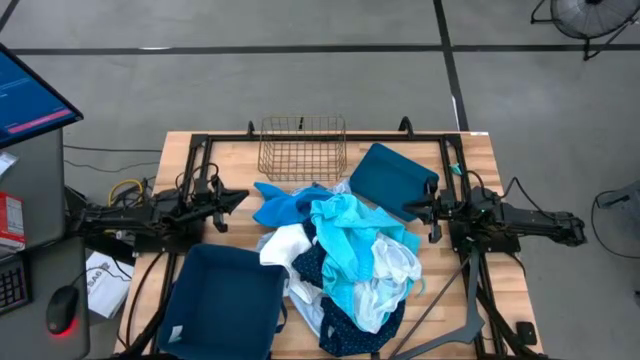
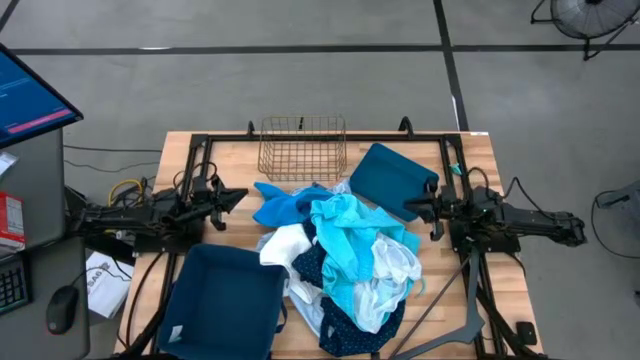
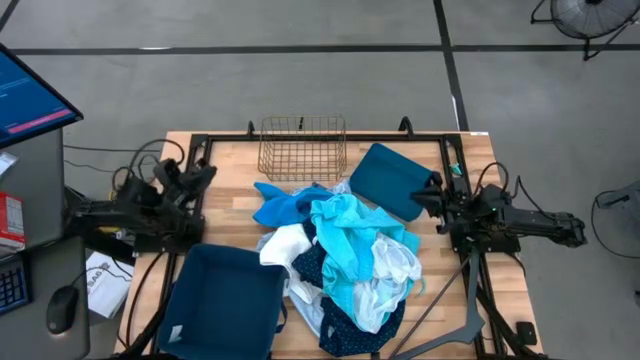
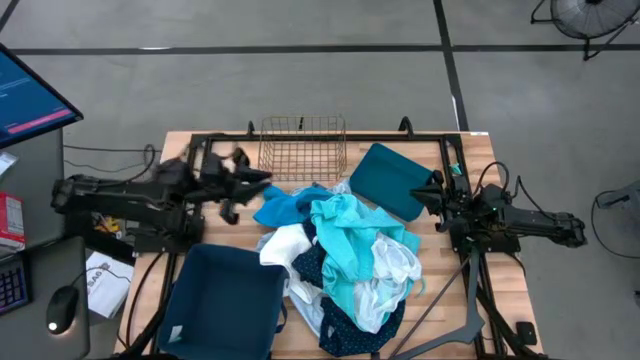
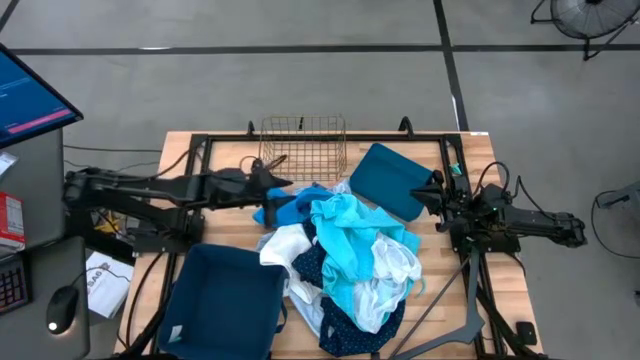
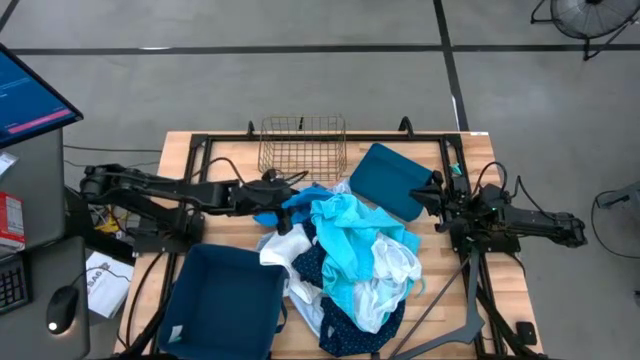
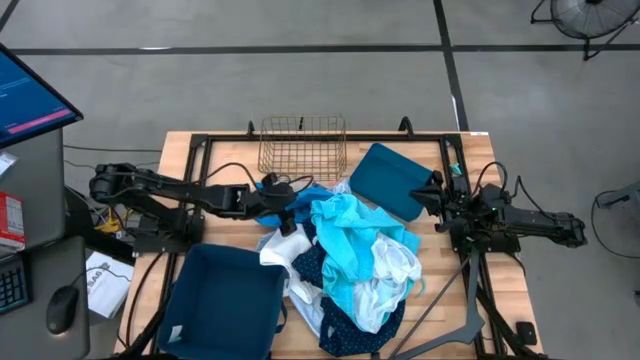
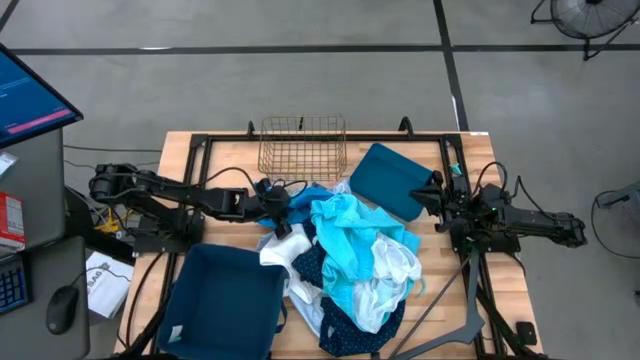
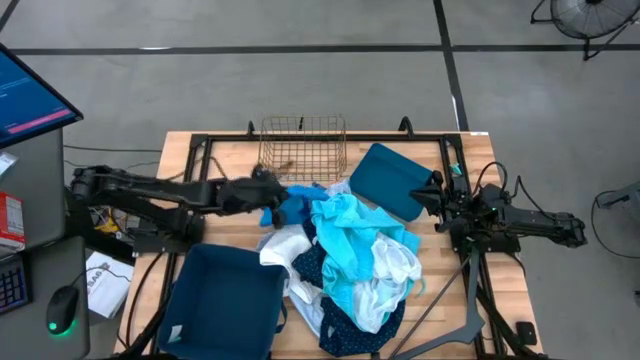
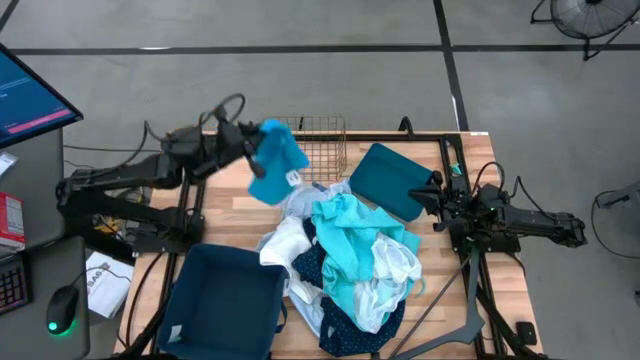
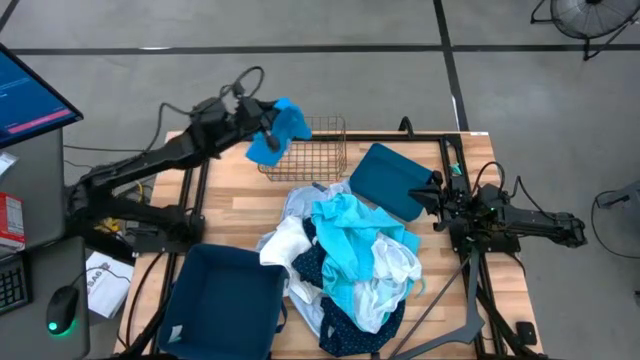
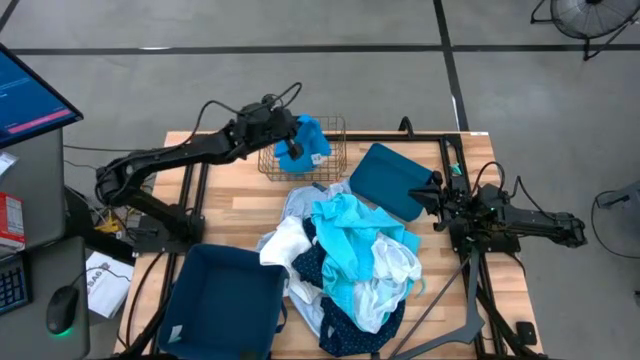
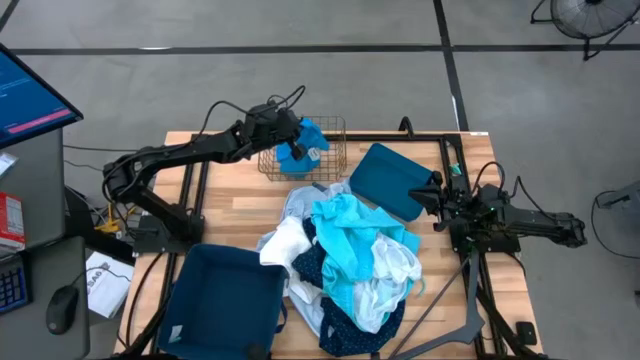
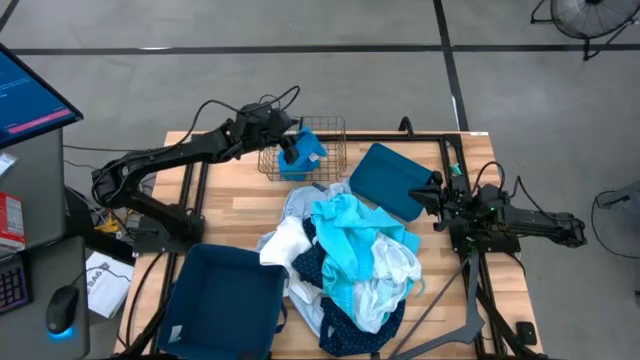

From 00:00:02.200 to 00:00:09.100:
Task: Pick & Place Cloths
Put the blue shorts into the gold basket

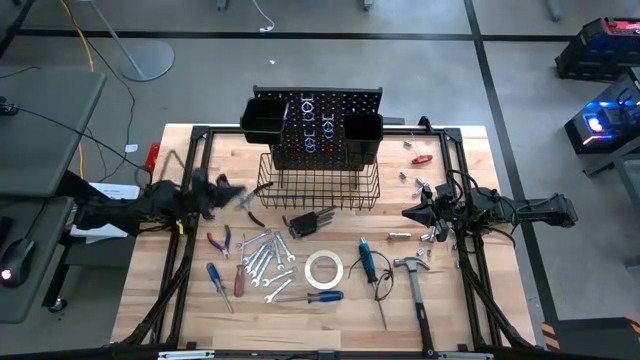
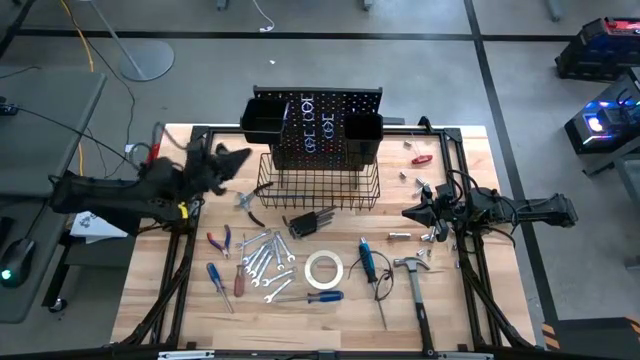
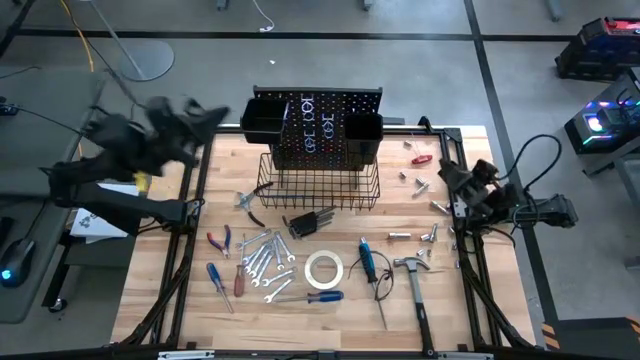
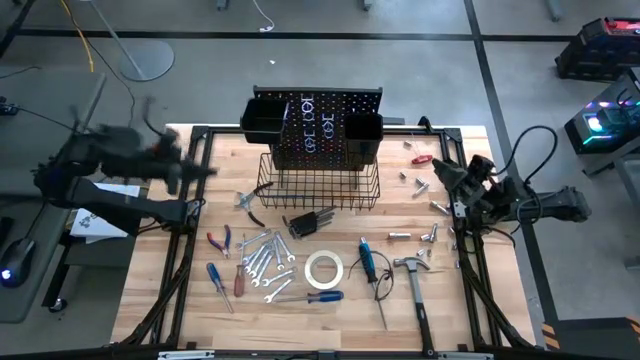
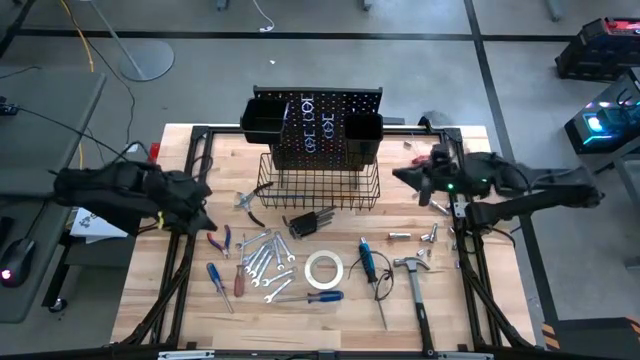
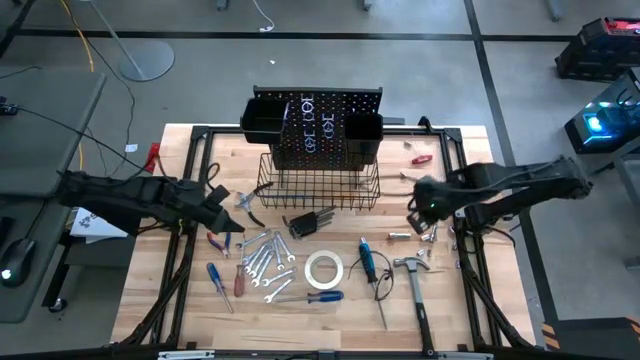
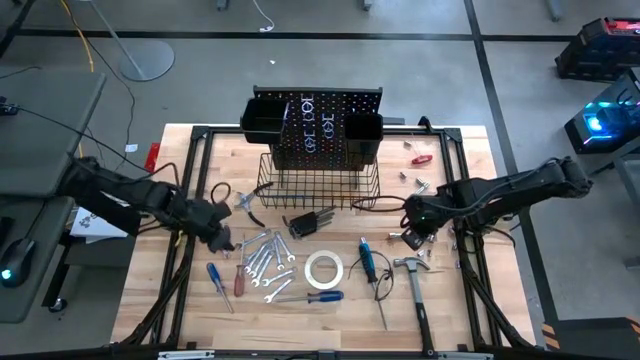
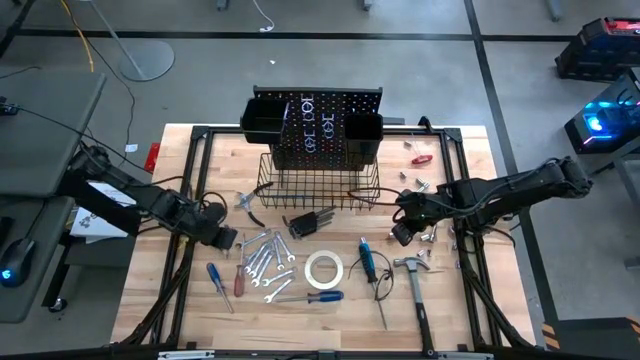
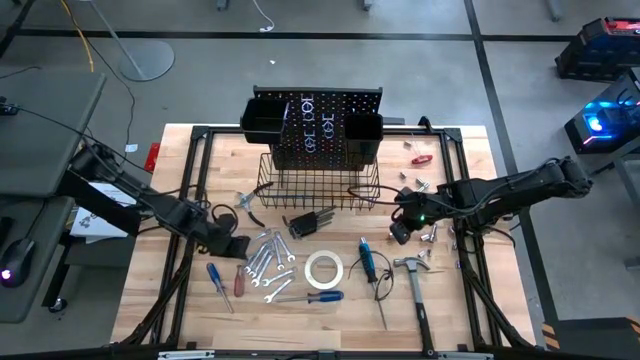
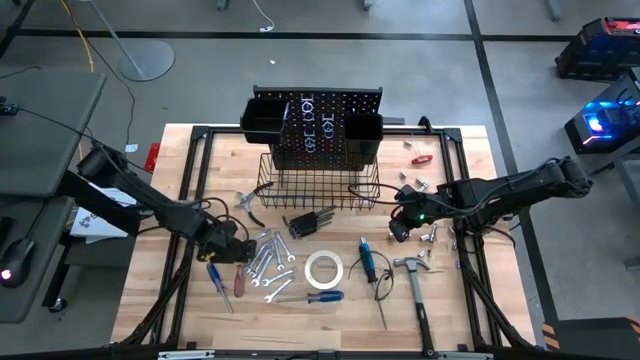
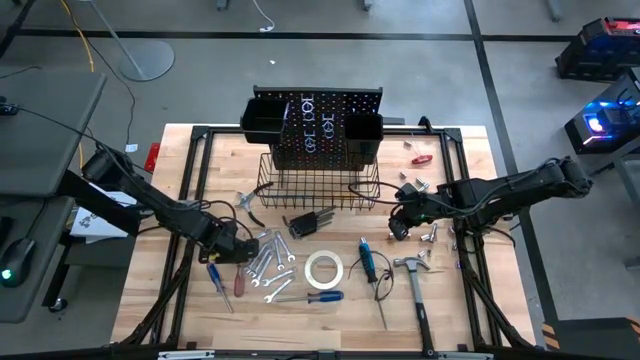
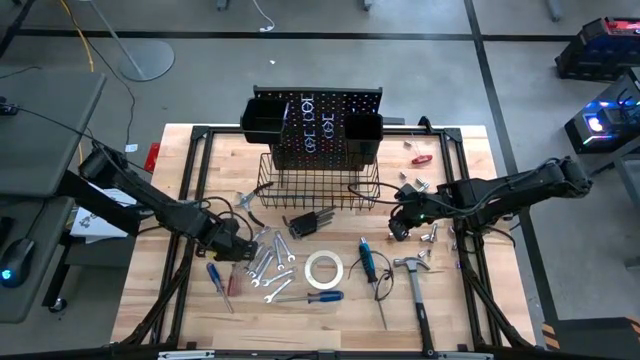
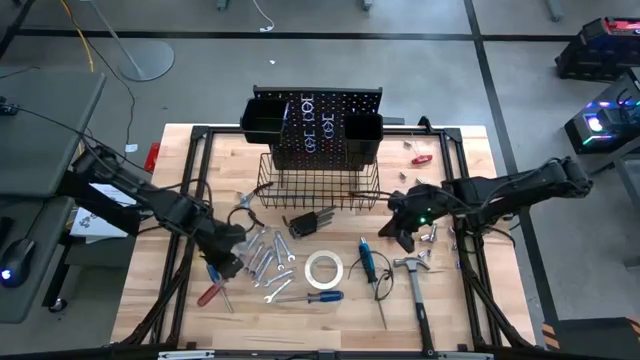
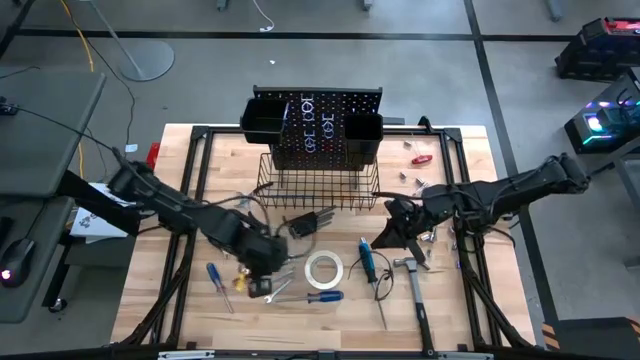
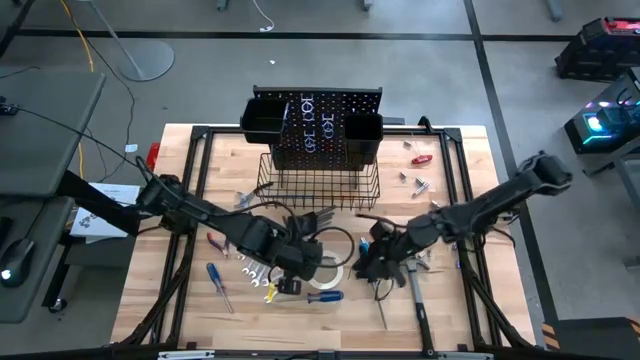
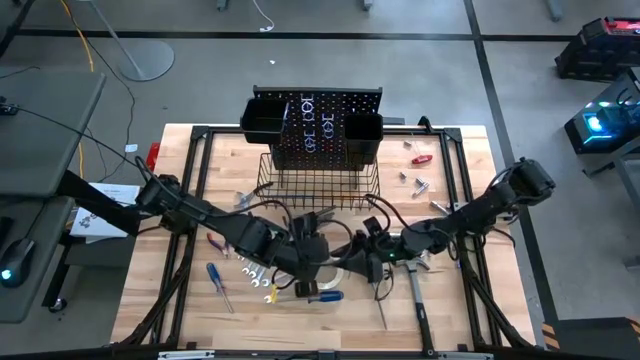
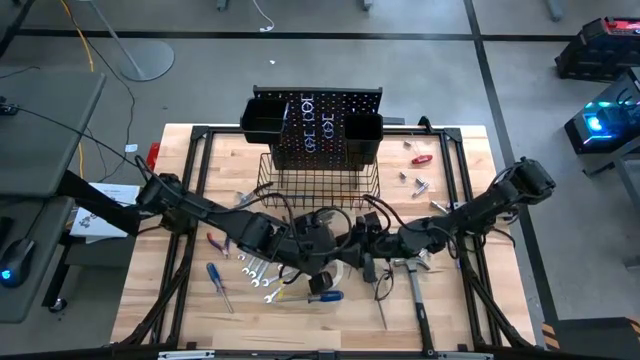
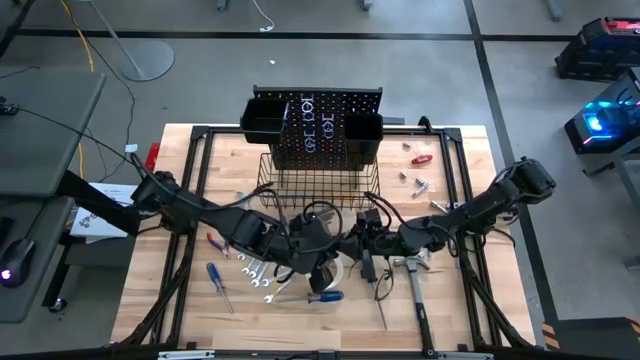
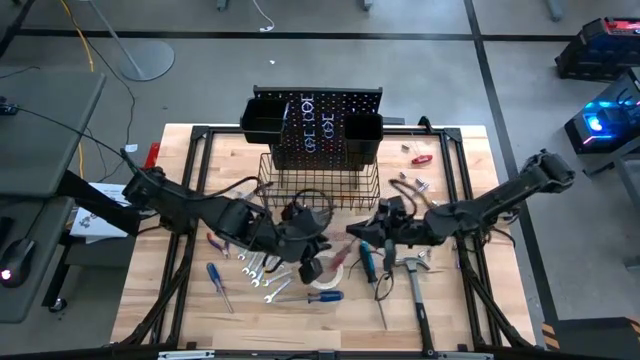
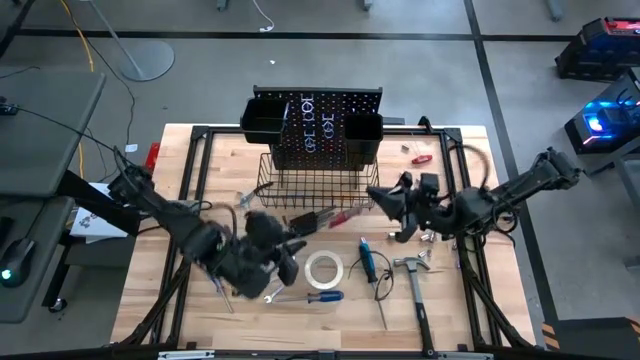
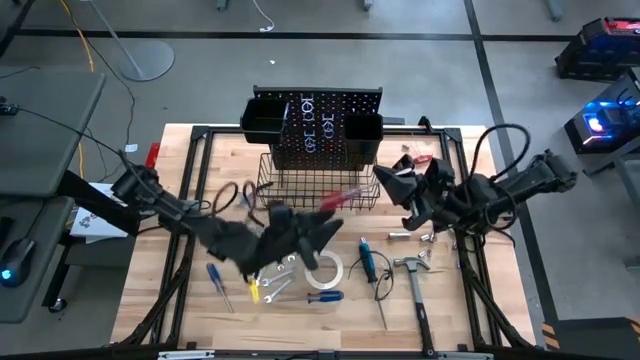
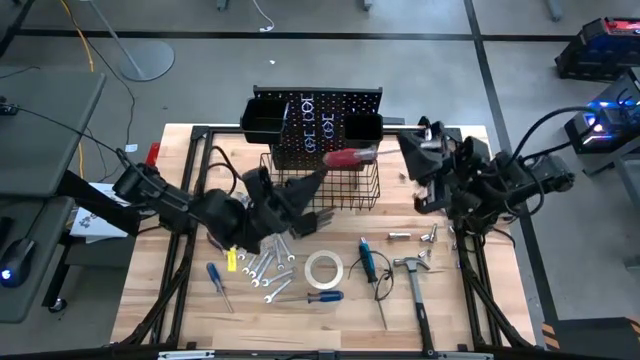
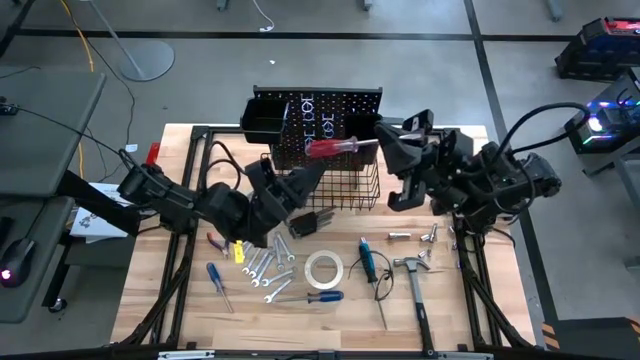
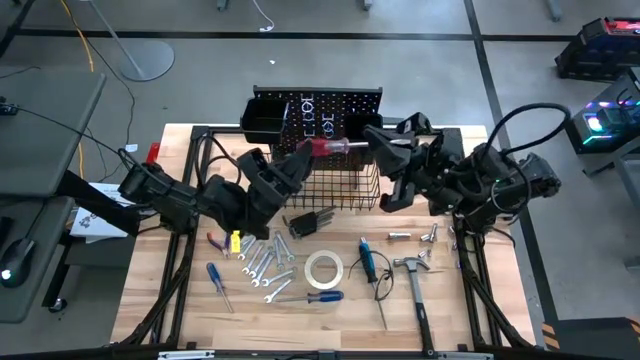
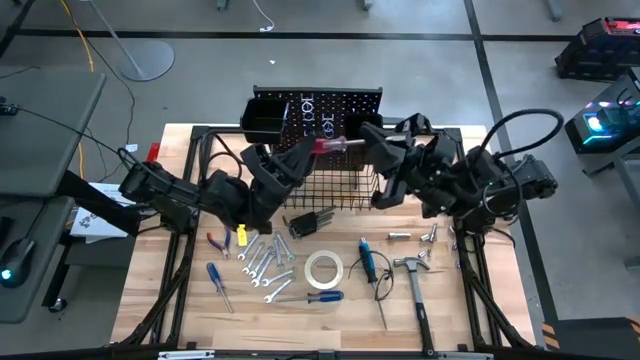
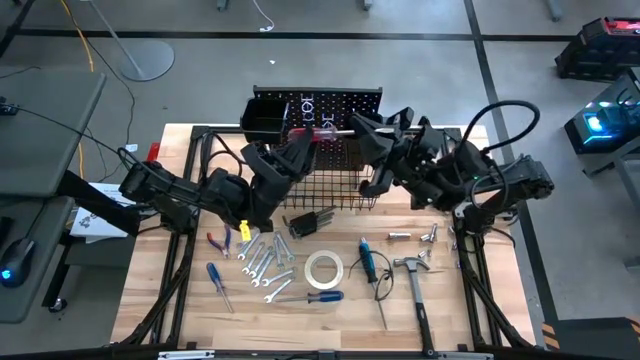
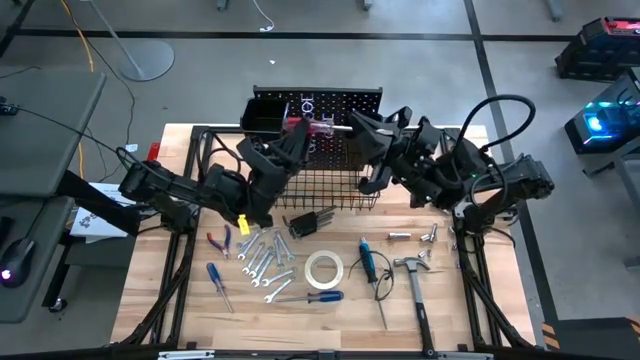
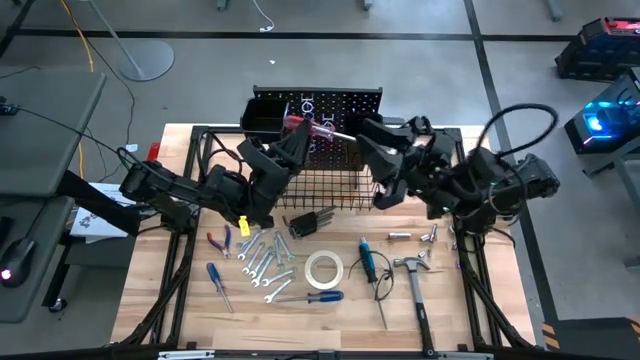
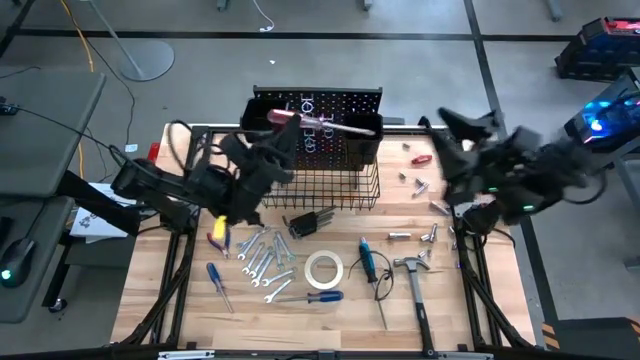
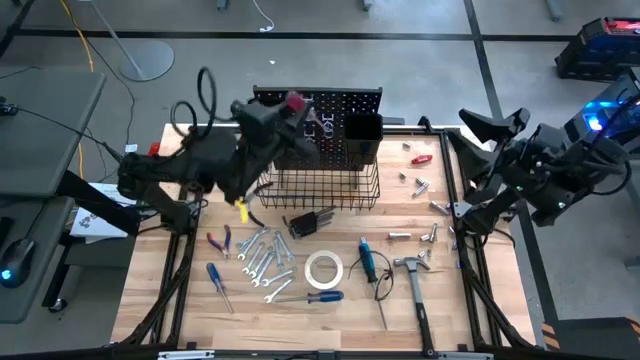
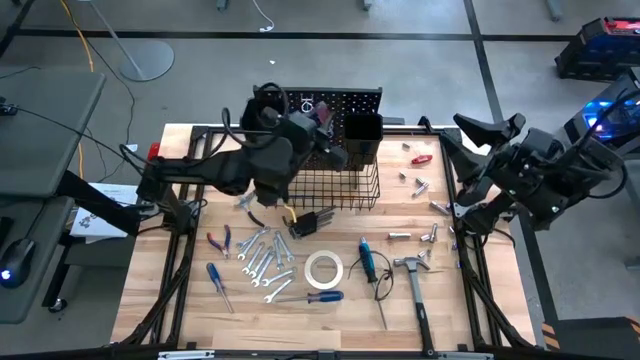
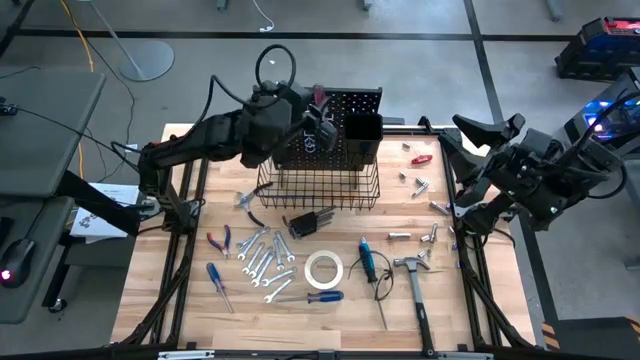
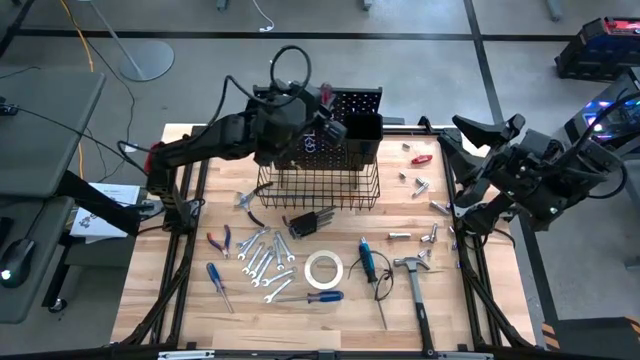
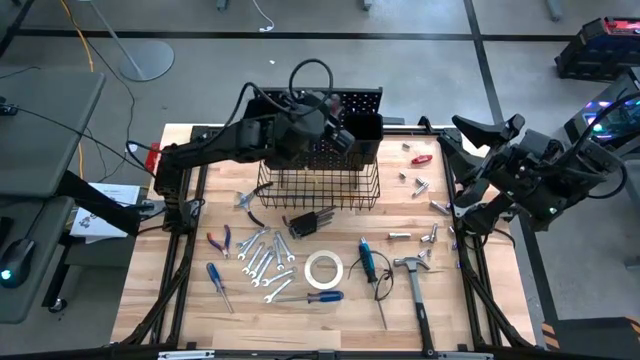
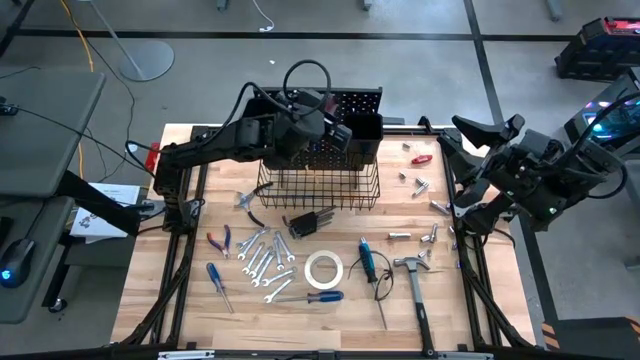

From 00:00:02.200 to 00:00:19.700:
Task: Hang tools onto peg board
Put the red transparent screwdriver in the right black bin on the pegboard
